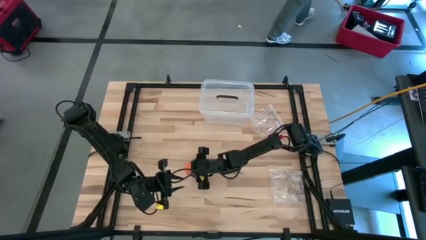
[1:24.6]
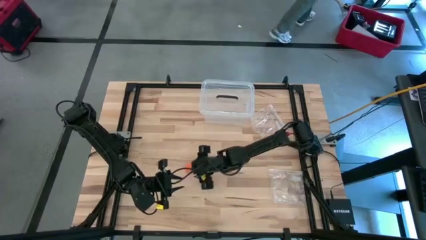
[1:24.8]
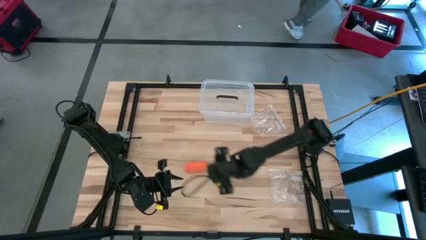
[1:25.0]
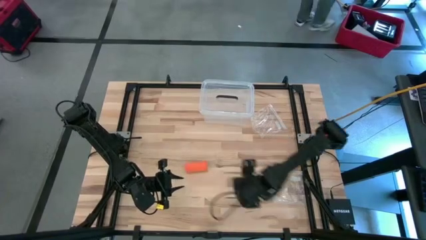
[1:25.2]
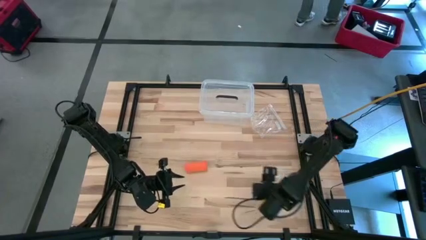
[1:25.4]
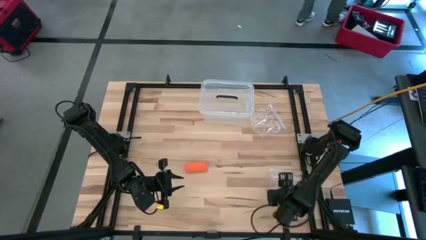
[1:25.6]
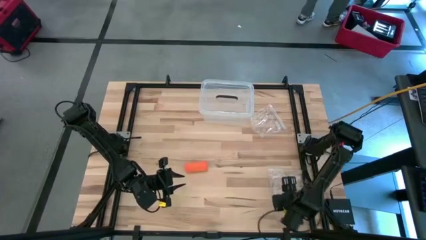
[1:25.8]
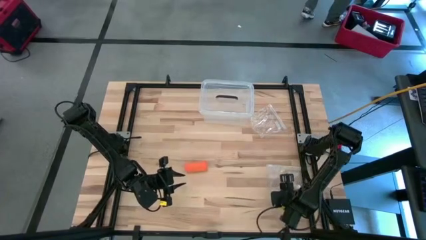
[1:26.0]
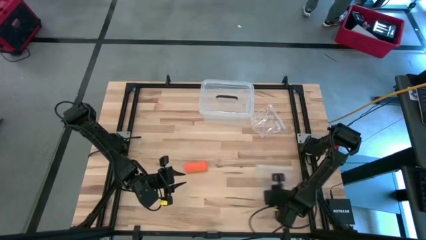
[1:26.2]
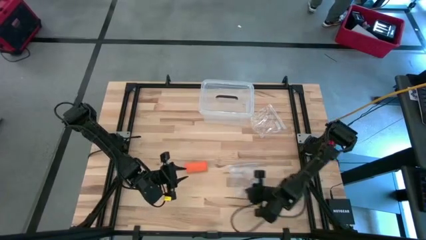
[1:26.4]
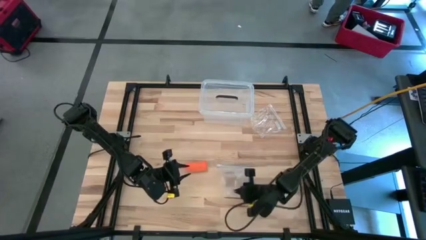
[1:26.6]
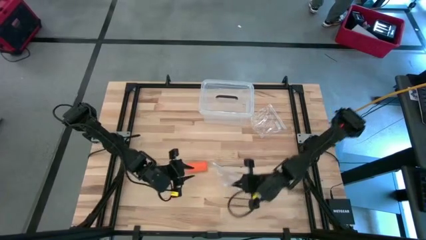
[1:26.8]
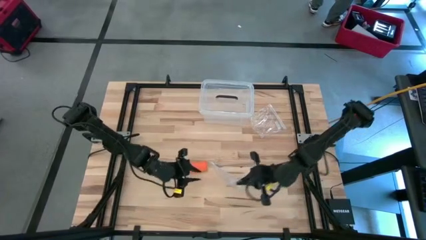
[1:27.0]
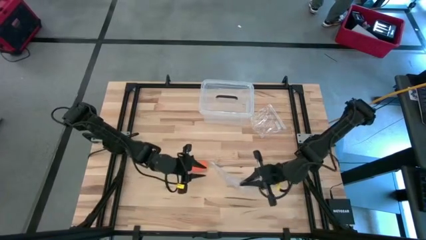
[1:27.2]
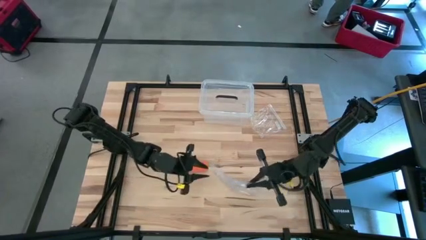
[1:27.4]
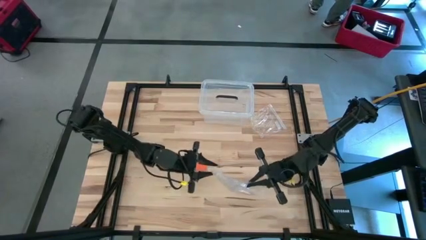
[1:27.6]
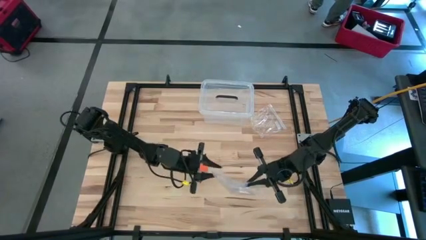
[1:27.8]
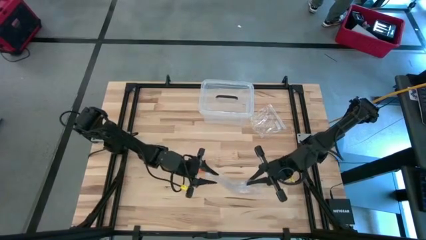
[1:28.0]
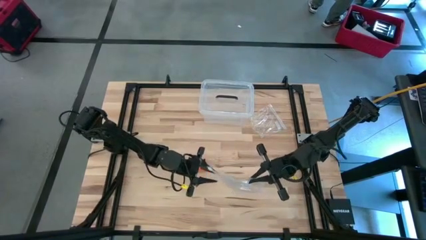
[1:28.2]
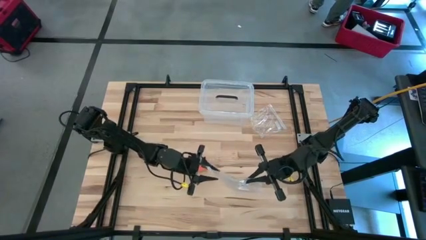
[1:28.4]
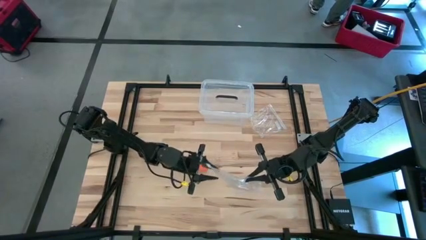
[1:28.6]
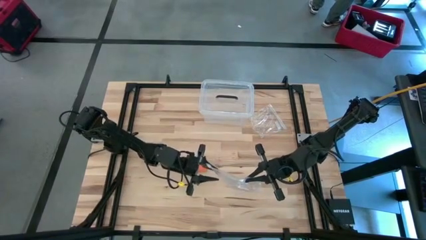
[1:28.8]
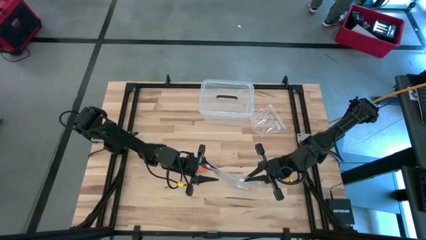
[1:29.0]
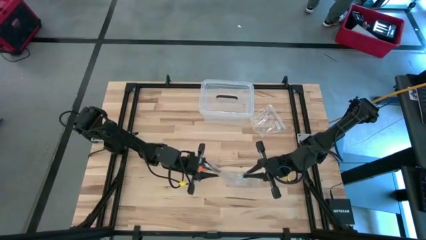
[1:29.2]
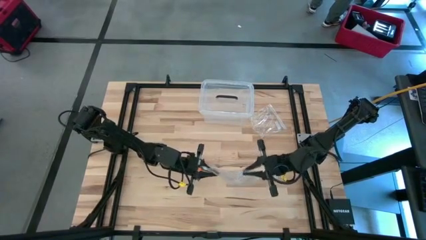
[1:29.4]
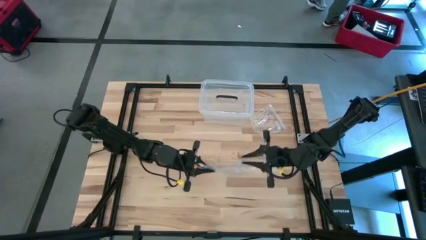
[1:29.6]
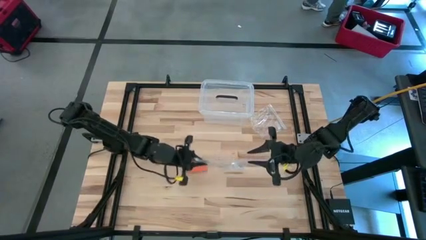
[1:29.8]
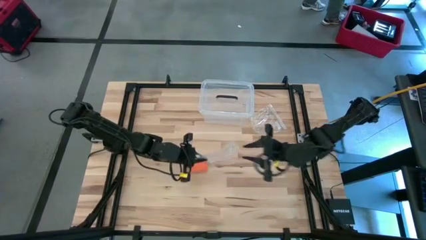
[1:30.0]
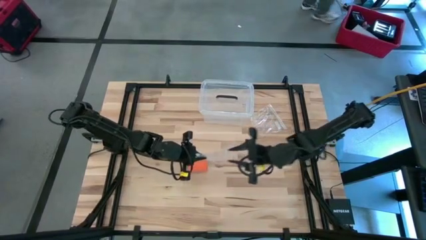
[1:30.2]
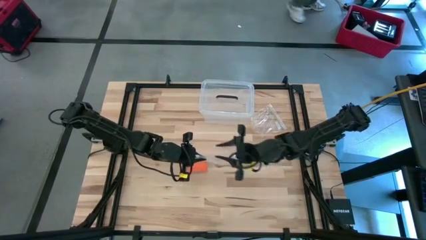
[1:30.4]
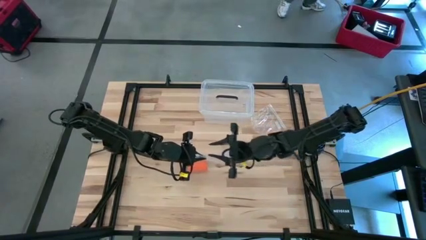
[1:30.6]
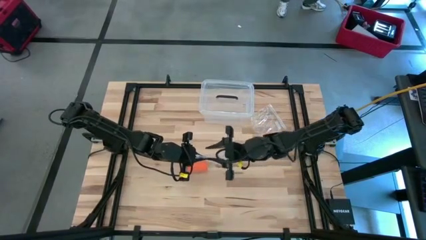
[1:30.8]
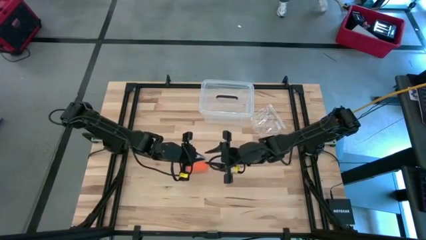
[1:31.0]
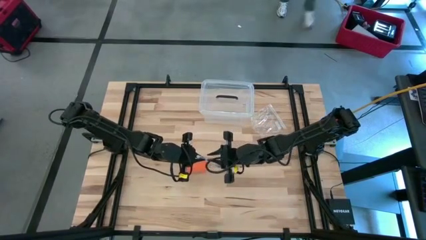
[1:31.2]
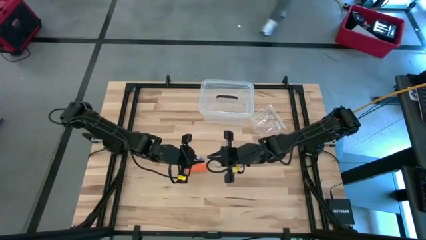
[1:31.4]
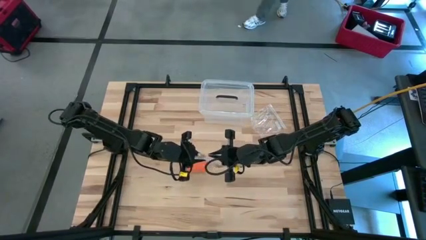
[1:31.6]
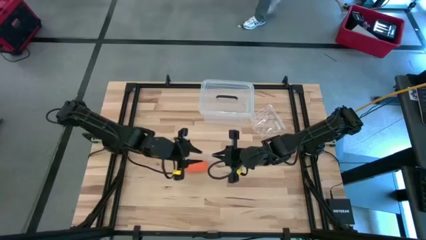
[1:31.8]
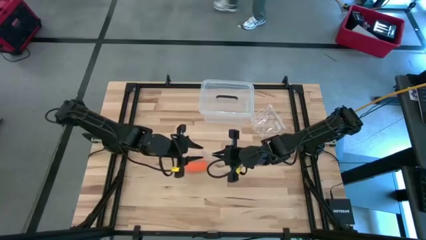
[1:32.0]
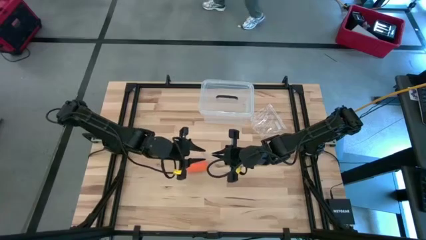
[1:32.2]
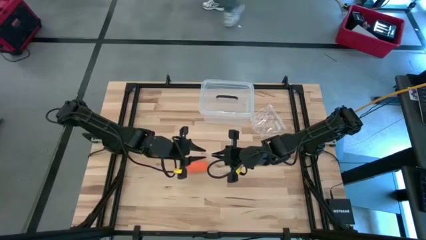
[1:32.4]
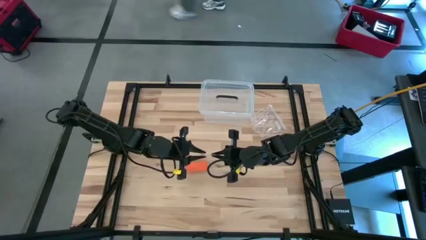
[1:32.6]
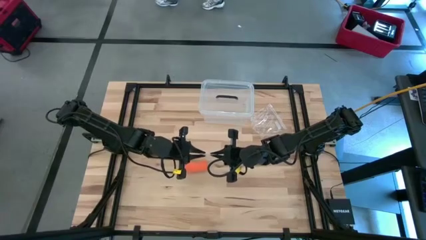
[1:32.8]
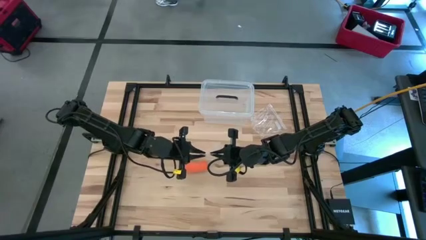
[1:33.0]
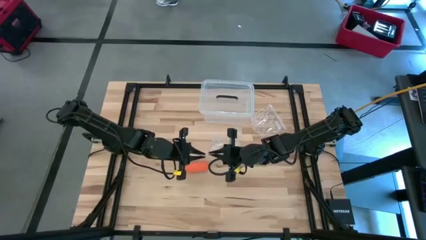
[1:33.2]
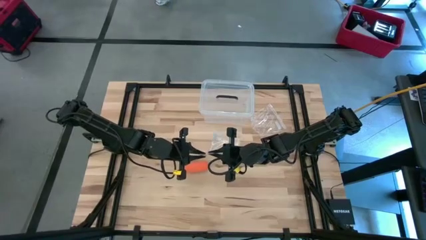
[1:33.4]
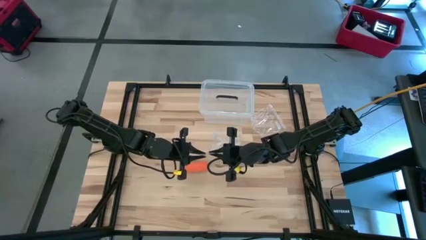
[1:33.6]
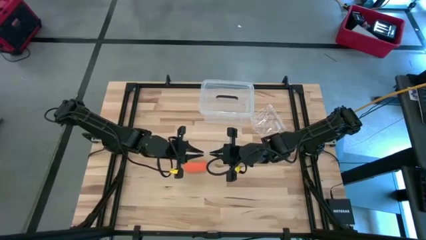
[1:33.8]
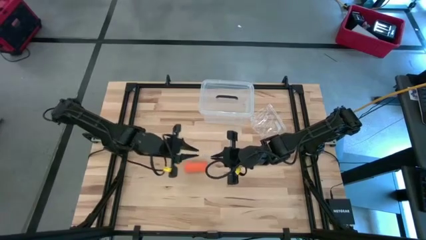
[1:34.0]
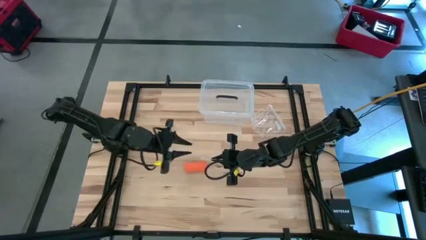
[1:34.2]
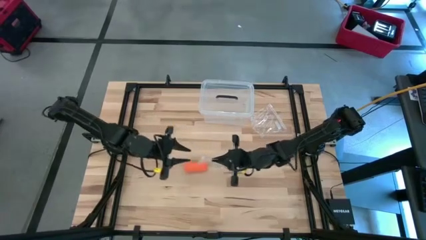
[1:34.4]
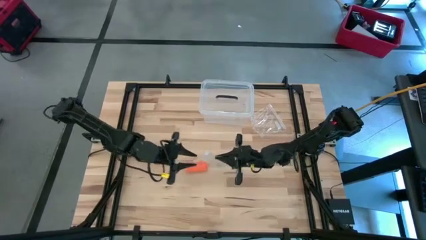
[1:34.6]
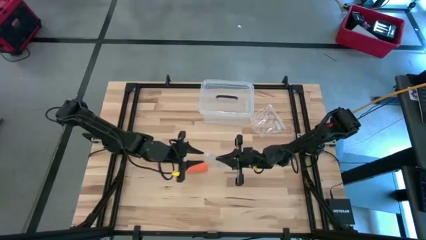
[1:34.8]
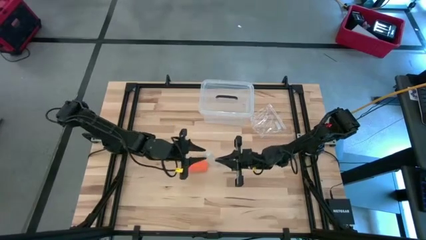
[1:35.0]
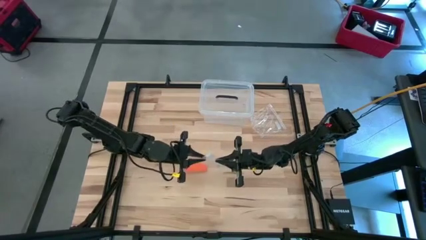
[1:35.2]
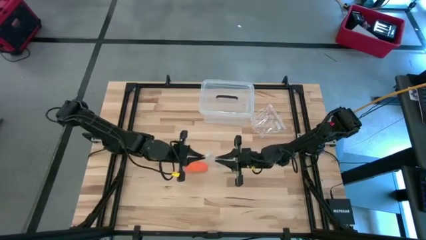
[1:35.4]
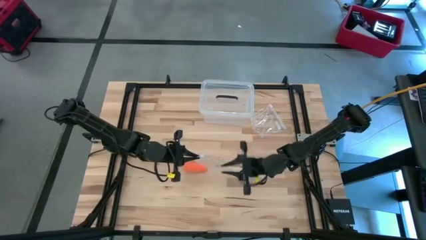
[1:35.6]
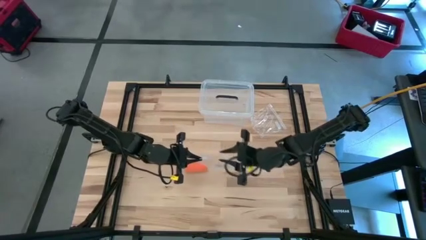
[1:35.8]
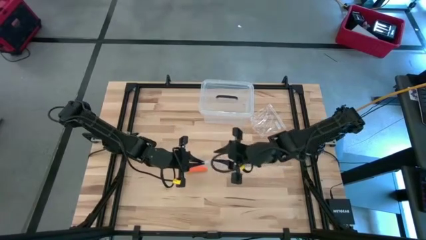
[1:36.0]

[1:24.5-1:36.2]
Task: Roll bandage
Open the bottom transparent zip bag

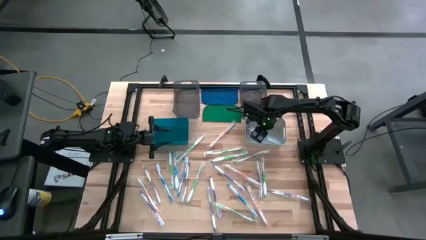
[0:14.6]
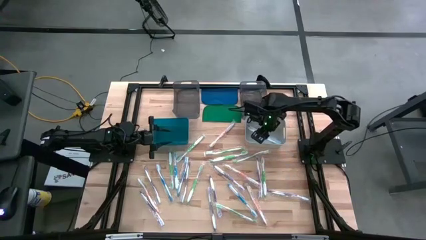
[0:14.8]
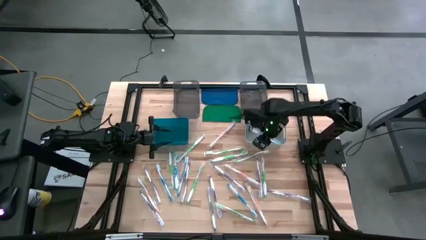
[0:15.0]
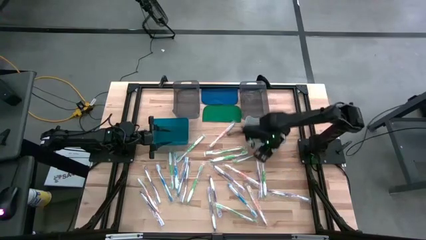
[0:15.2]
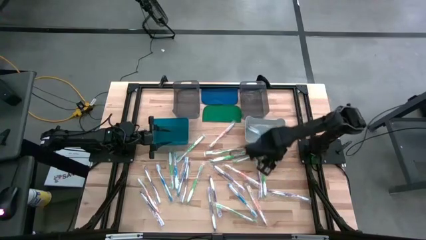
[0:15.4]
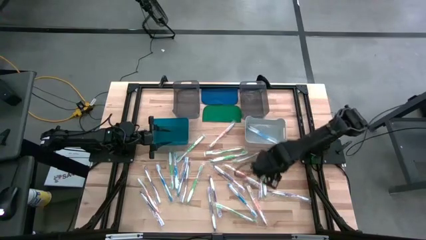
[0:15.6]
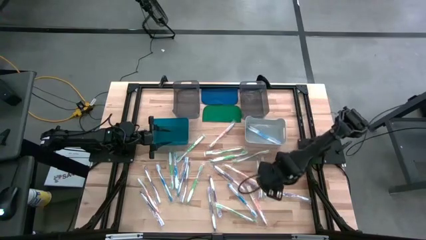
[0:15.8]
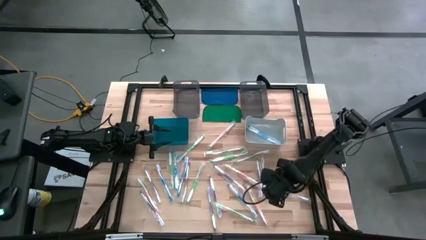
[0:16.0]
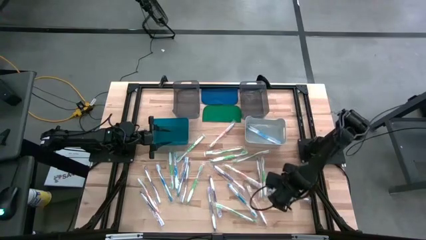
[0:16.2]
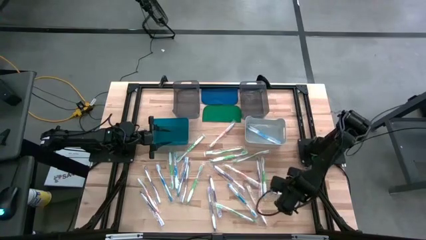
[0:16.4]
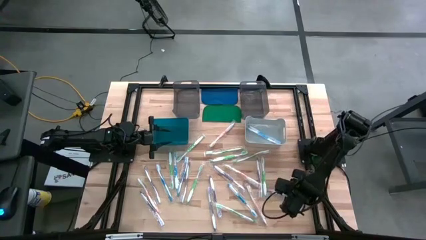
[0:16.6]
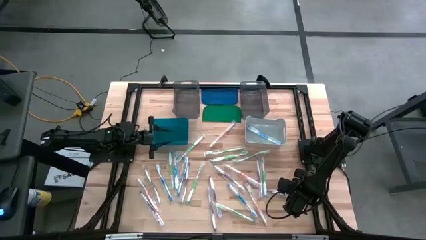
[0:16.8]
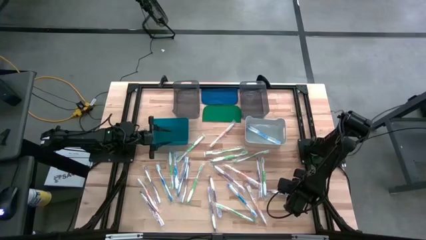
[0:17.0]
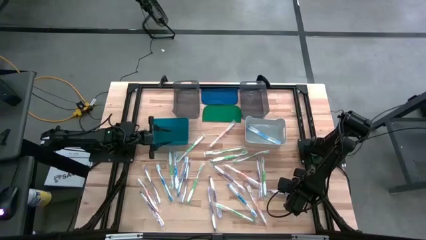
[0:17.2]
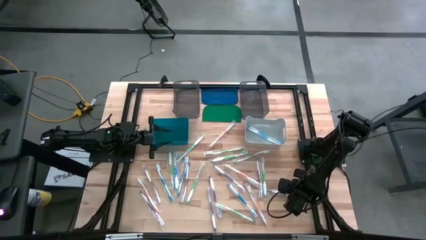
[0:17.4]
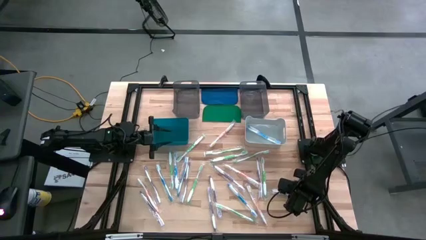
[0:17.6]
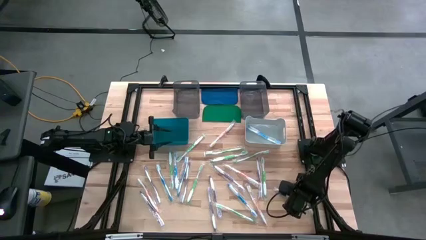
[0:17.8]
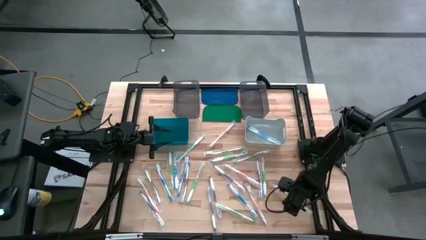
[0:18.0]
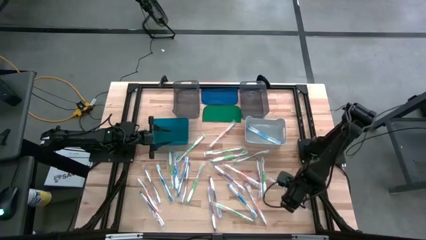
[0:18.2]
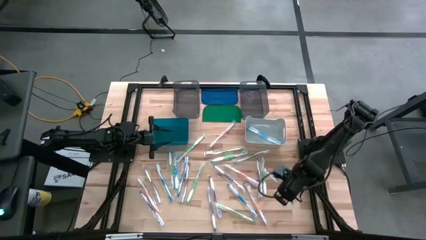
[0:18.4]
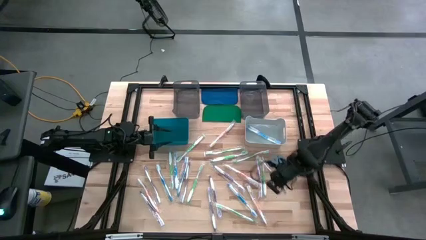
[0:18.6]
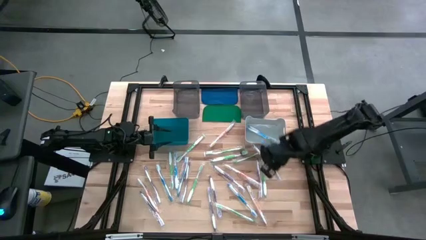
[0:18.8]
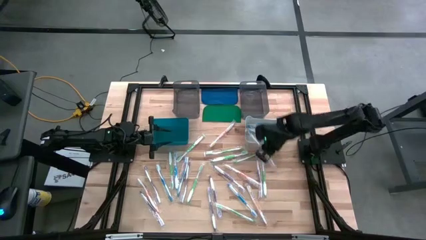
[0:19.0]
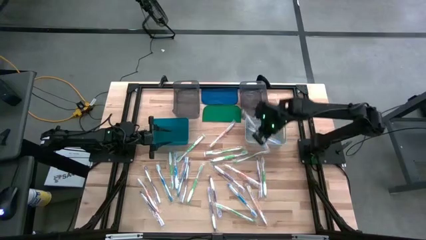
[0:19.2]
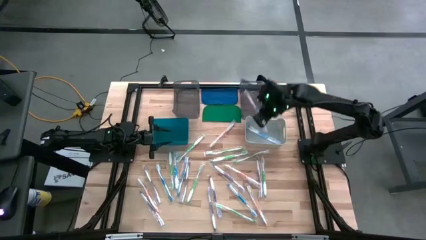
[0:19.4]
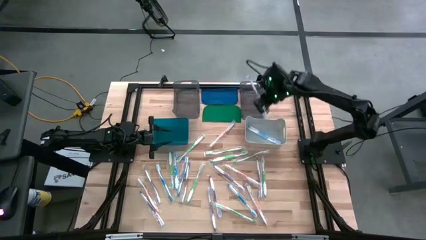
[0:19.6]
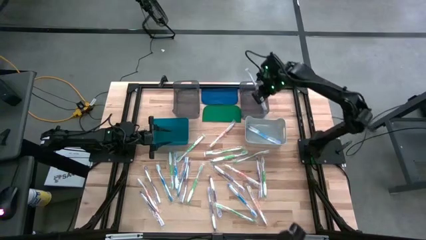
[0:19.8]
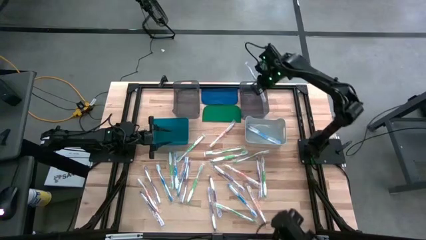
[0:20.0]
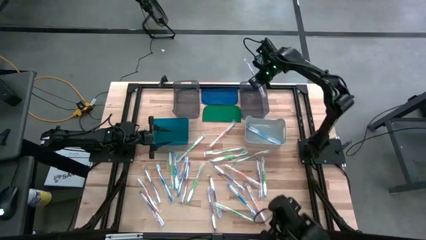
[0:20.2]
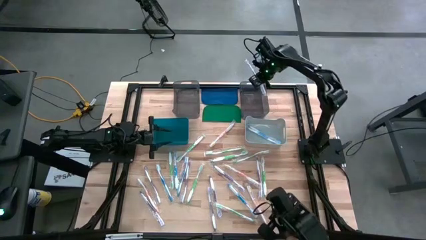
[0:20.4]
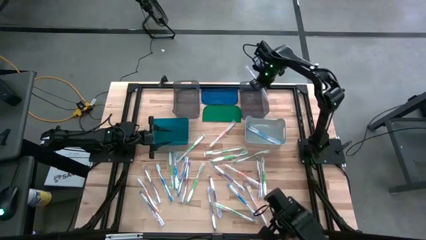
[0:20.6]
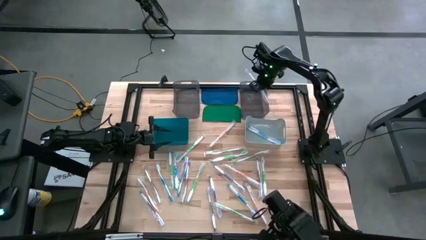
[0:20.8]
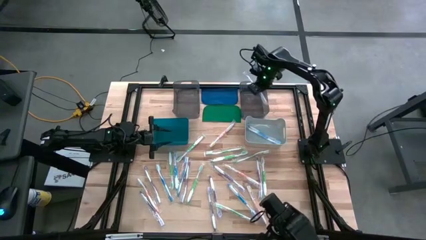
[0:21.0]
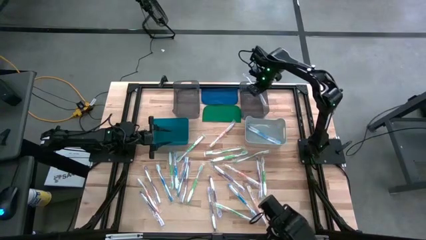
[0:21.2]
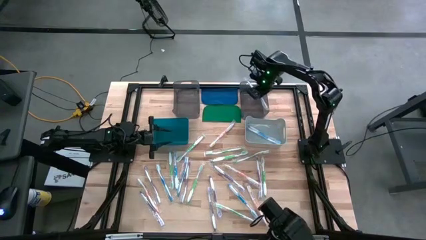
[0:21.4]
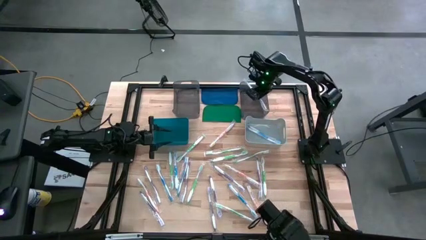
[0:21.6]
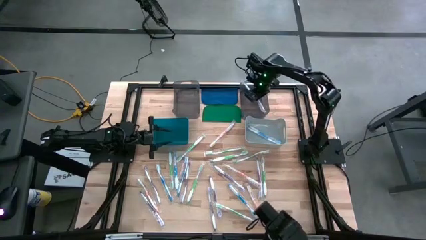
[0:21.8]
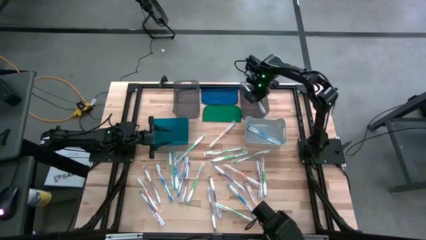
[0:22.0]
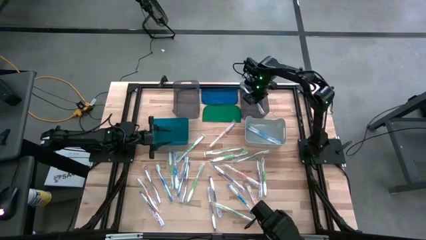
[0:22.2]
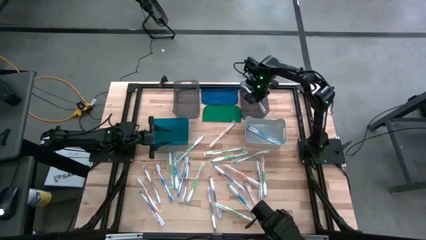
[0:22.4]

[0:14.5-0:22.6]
Task: Pick & Place Toothbrushes
Put the violet toothbrush into the right black bin
